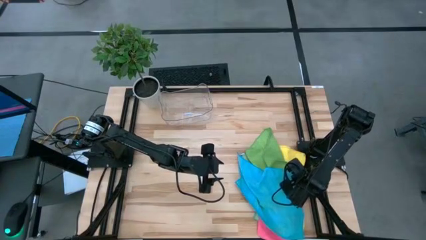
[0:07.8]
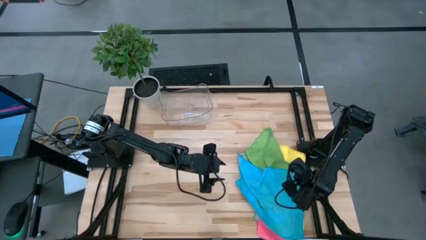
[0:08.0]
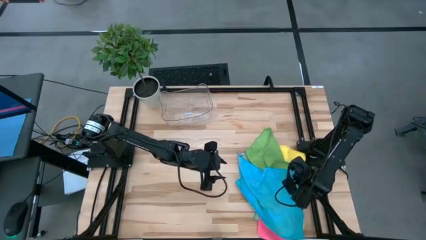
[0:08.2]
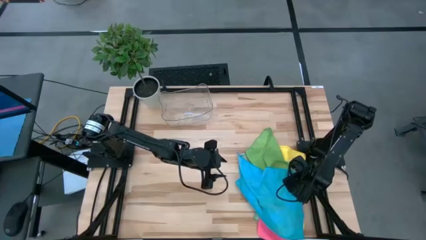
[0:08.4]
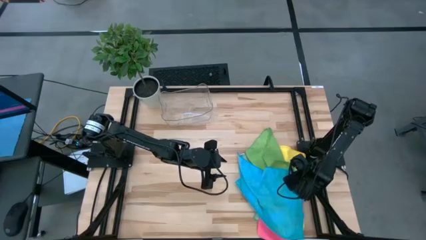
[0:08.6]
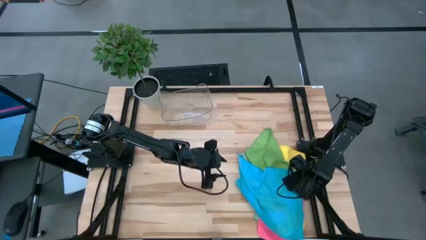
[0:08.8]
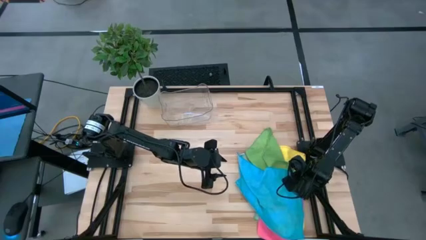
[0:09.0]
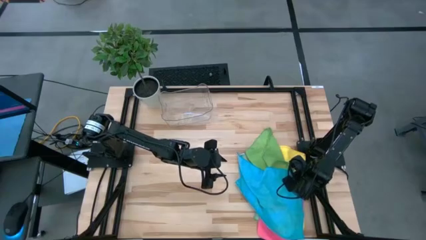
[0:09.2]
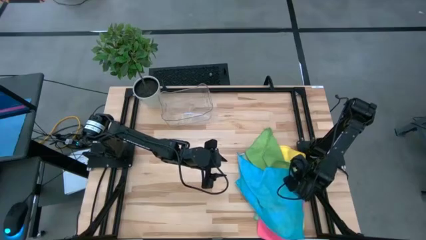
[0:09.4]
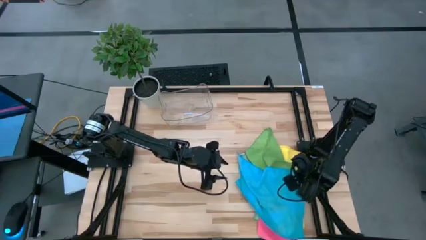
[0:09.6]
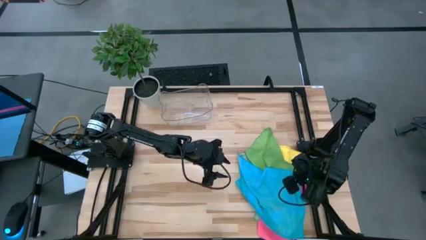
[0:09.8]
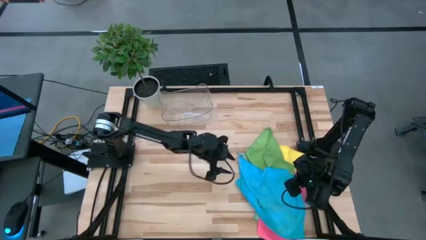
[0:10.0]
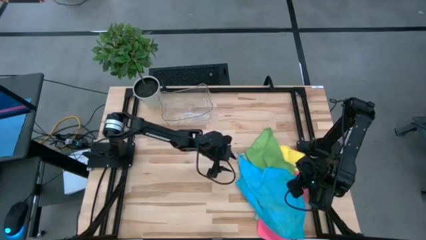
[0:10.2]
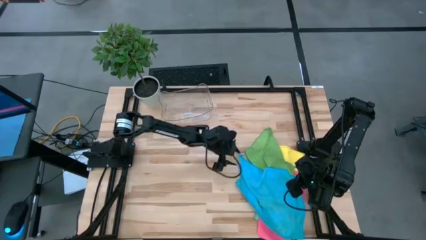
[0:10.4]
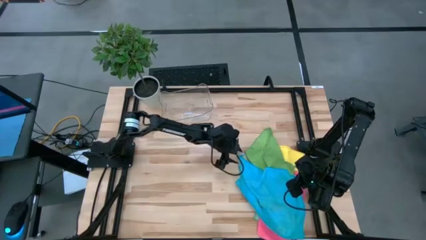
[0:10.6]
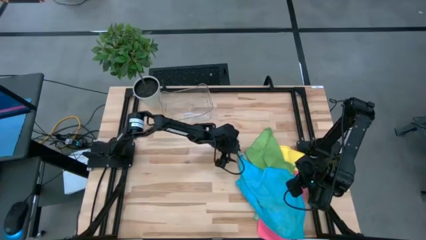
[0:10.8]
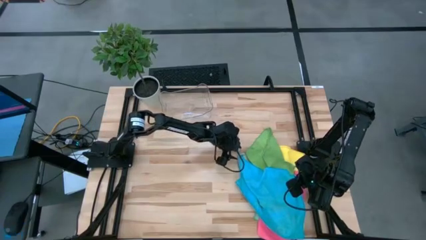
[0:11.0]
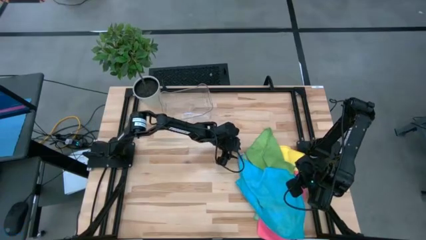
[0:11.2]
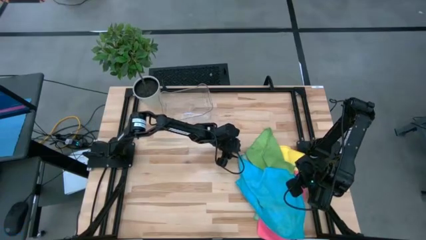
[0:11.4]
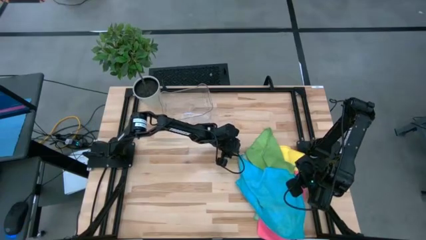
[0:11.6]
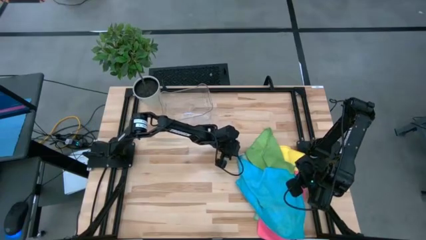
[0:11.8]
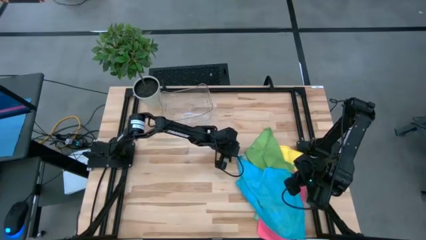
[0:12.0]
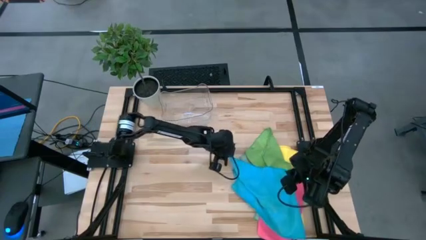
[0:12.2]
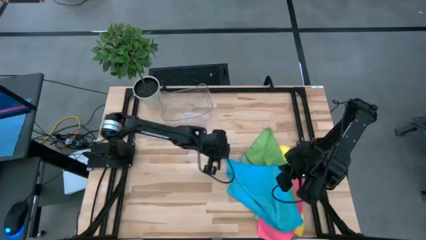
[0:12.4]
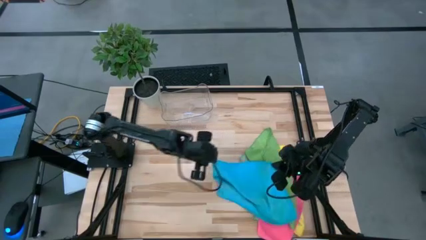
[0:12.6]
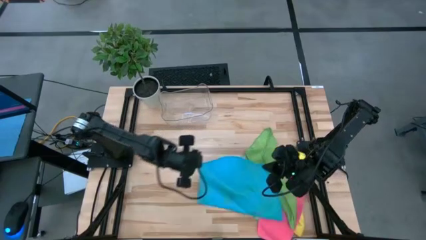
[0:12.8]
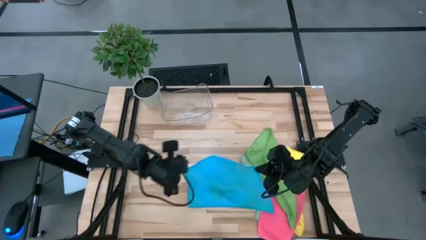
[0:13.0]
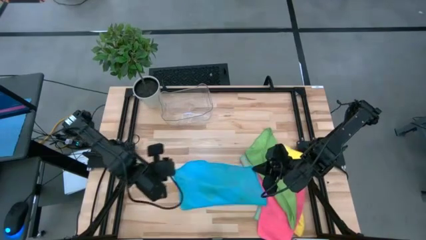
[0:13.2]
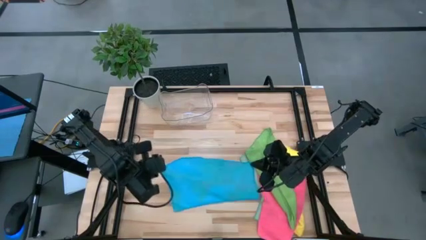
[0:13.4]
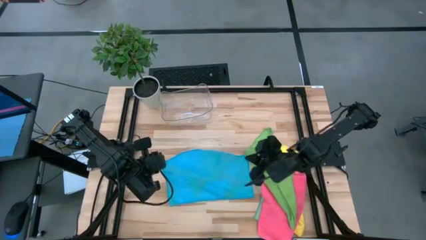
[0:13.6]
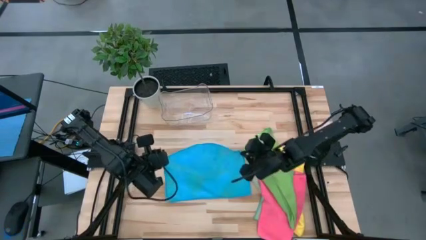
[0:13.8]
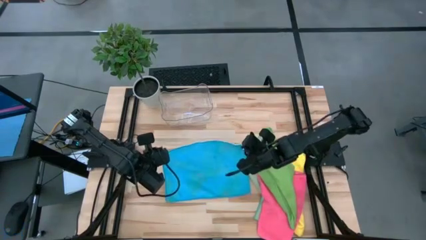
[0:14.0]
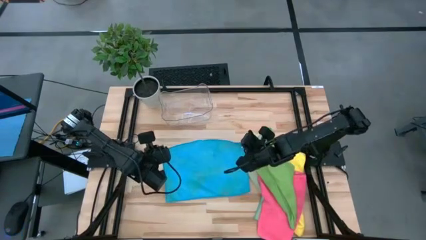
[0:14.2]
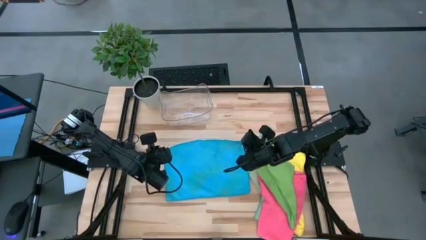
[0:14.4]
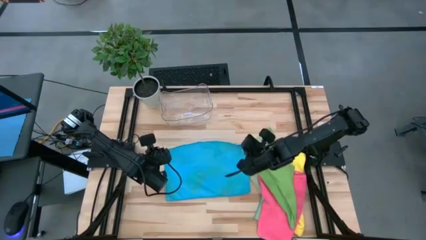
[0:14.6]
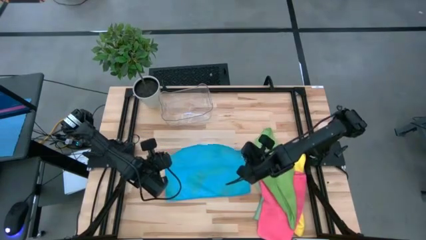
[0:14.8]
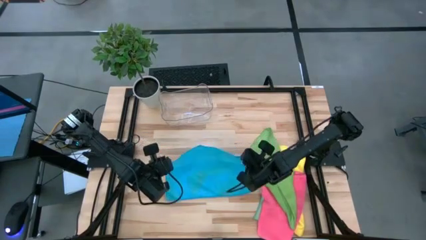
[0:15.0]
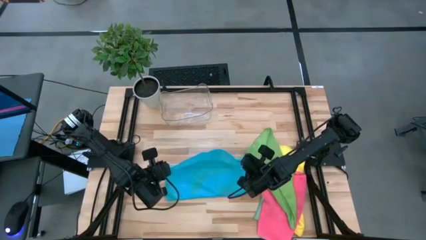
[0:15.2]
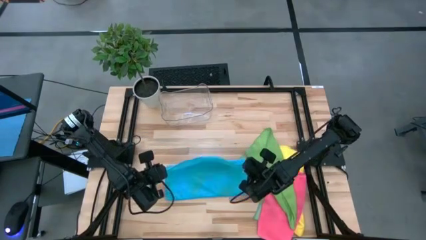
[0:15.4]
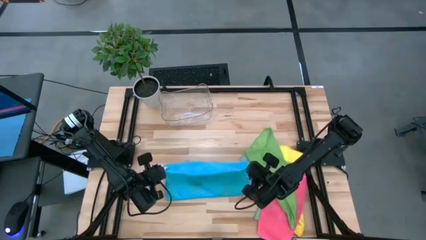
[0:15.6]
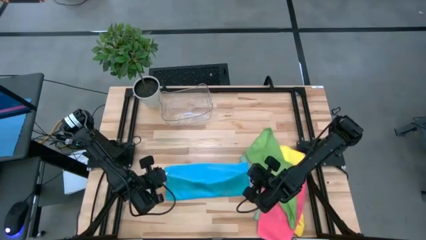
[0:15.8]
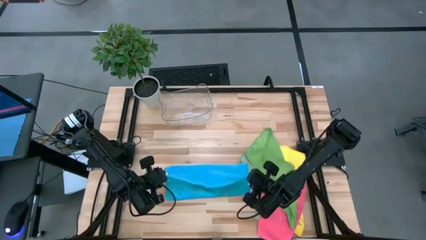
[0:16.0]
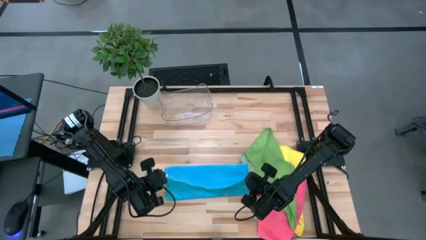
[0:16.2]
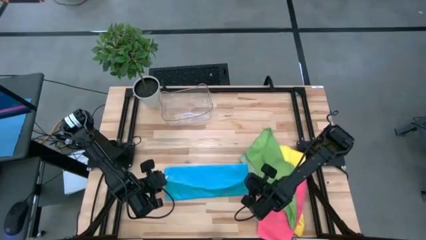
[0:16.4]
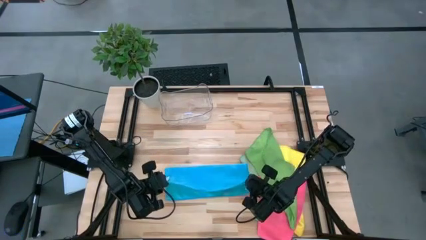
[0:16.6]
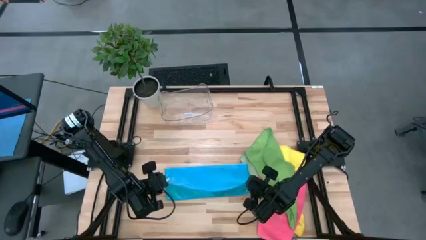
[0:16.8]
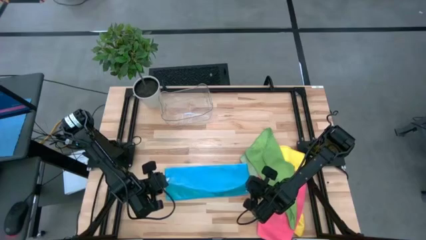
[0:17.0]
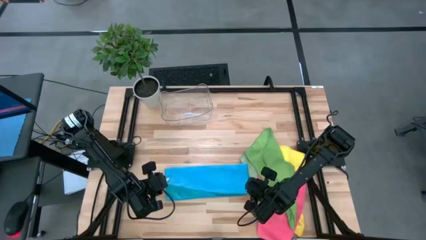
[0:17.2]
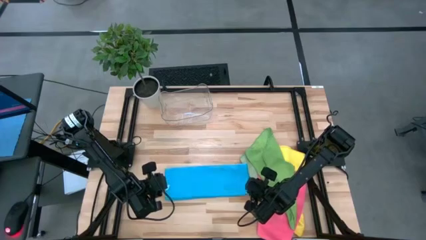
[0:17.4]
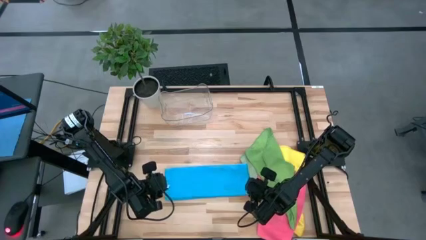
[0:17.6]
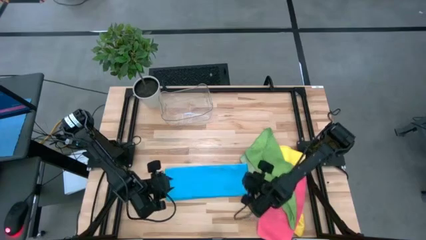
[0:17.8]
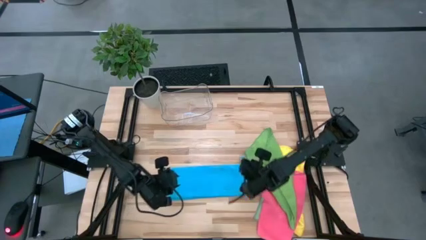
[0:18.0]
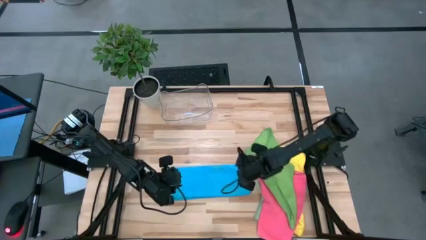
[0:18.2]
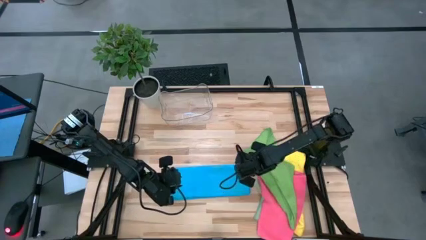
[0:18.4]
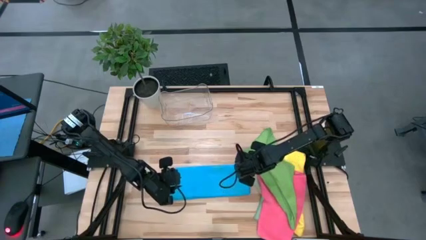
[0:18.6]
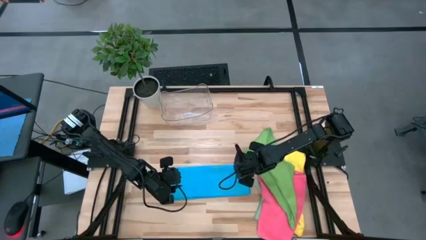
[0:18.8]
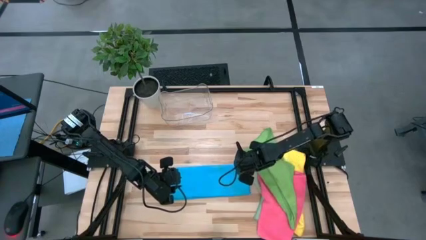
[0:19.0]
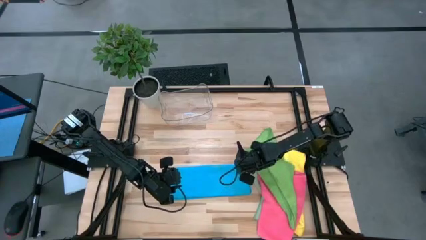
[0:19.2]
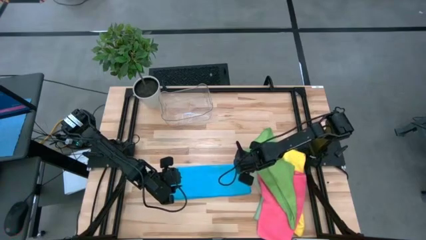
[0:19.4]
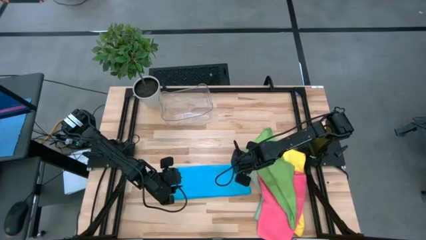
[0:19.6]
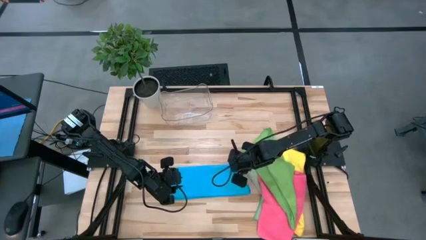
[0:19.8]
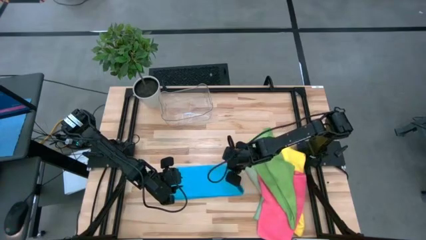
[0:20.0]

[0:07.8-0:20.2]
Task: Fold microfiber towels
Fold the blue microfiber cloth
